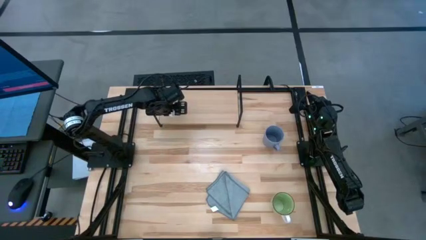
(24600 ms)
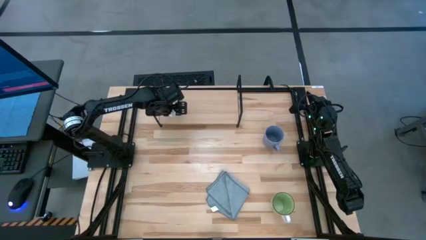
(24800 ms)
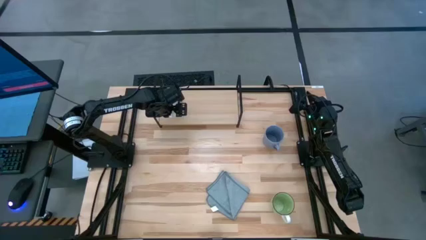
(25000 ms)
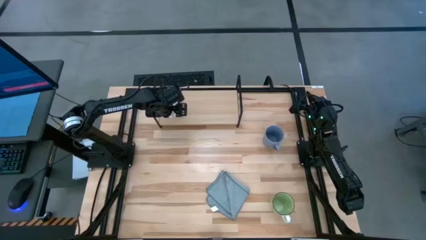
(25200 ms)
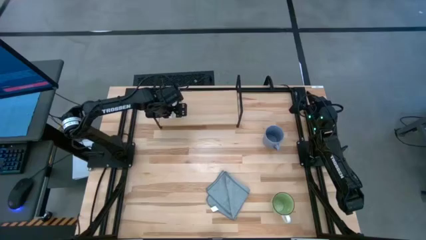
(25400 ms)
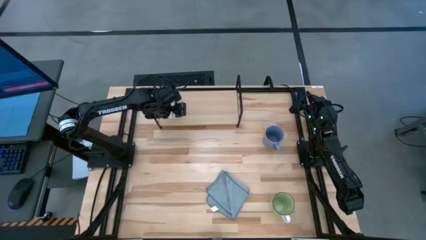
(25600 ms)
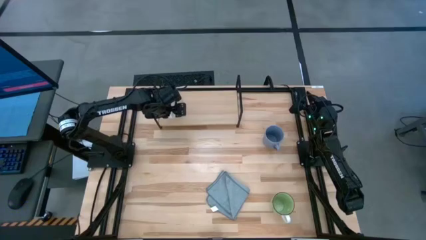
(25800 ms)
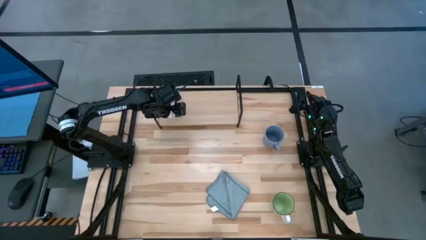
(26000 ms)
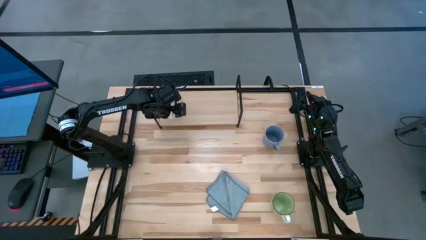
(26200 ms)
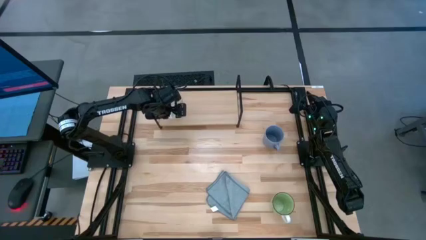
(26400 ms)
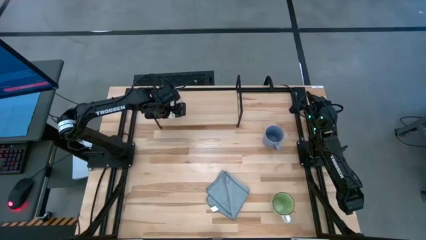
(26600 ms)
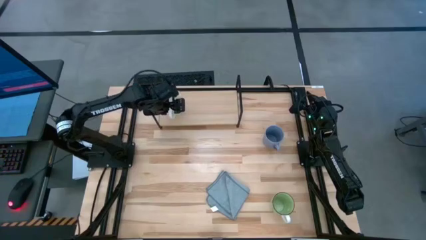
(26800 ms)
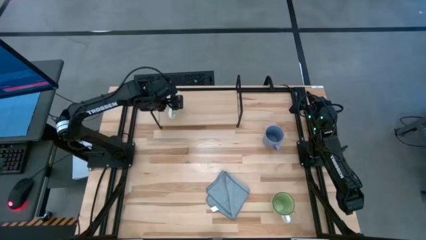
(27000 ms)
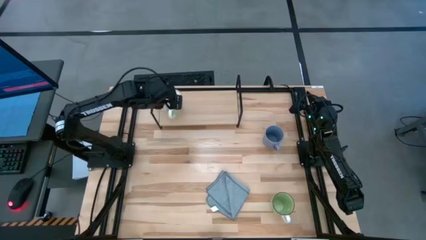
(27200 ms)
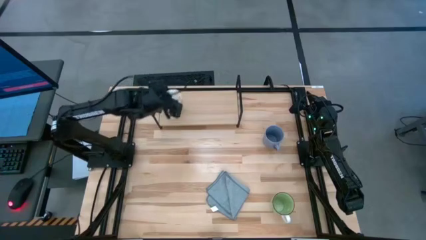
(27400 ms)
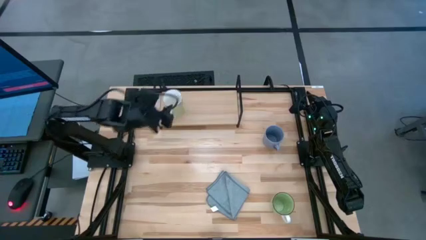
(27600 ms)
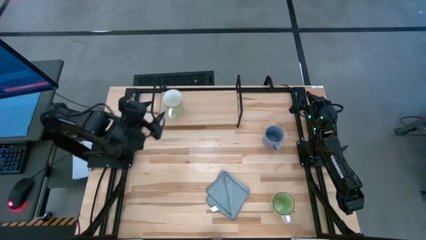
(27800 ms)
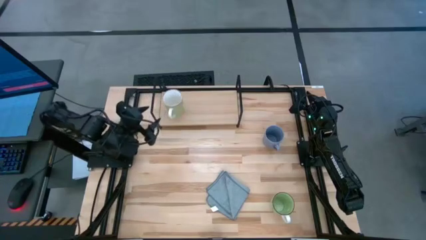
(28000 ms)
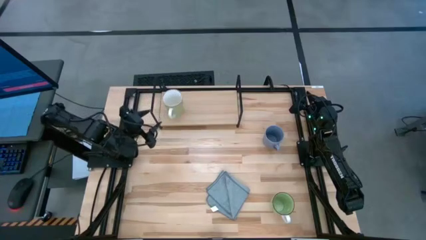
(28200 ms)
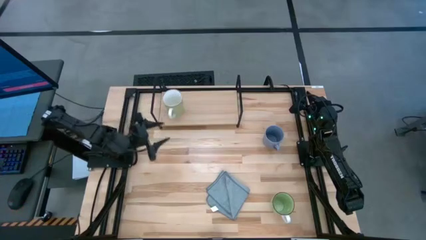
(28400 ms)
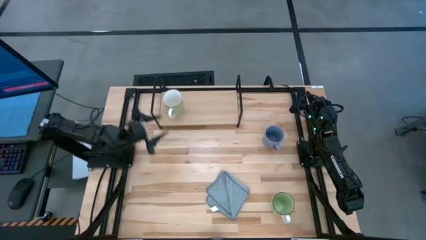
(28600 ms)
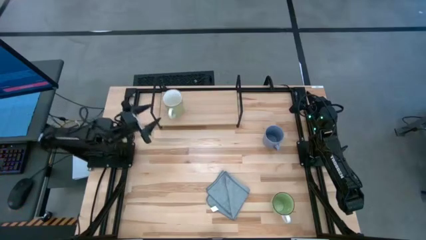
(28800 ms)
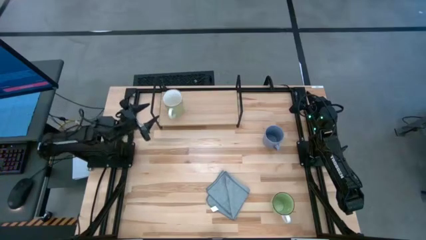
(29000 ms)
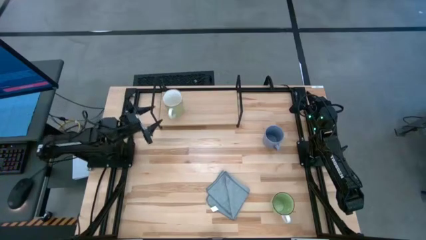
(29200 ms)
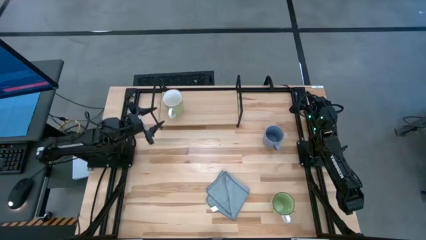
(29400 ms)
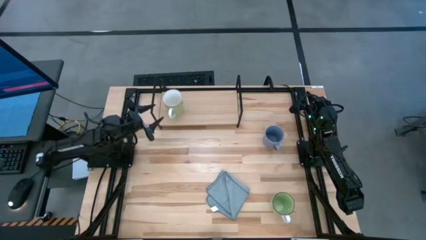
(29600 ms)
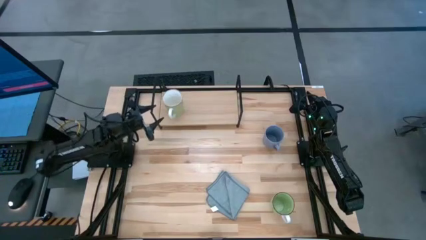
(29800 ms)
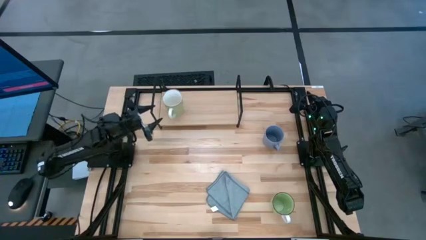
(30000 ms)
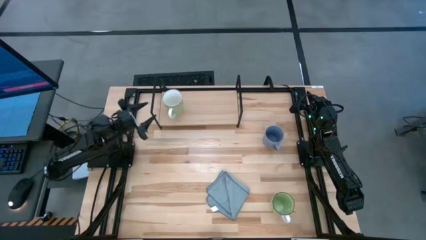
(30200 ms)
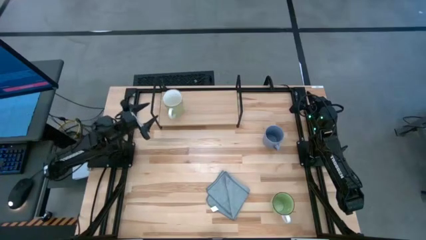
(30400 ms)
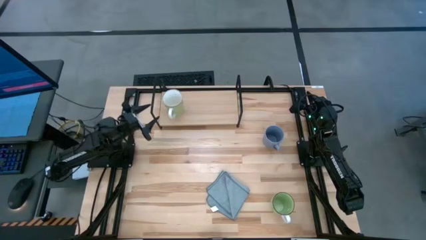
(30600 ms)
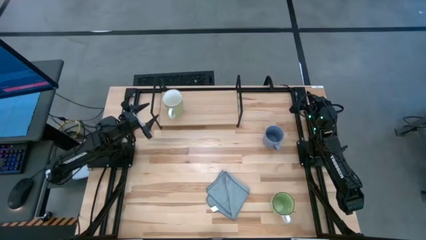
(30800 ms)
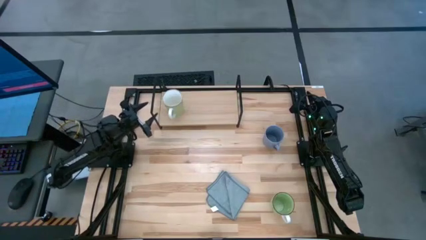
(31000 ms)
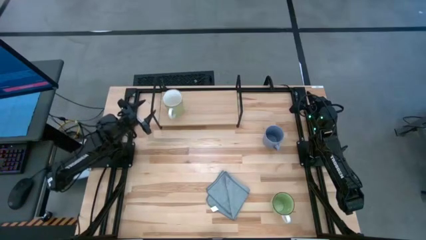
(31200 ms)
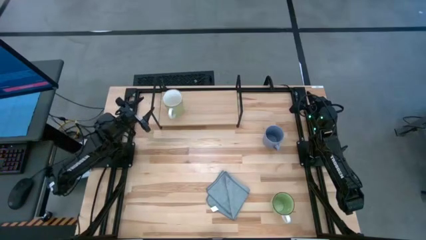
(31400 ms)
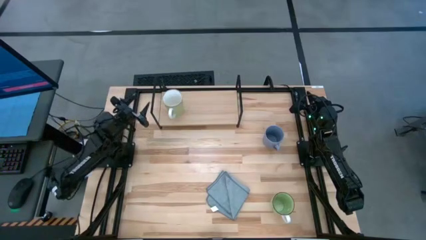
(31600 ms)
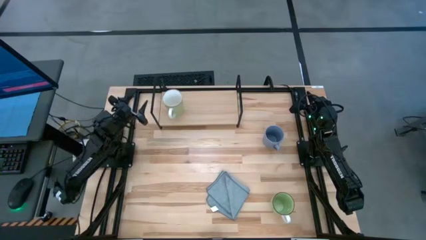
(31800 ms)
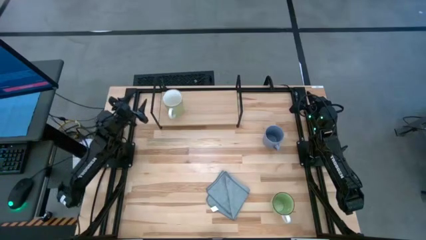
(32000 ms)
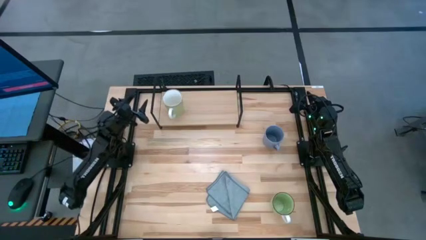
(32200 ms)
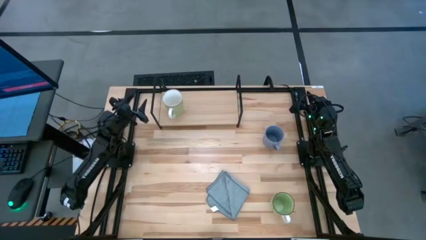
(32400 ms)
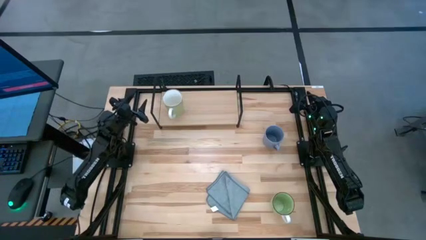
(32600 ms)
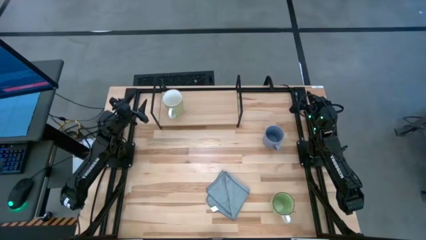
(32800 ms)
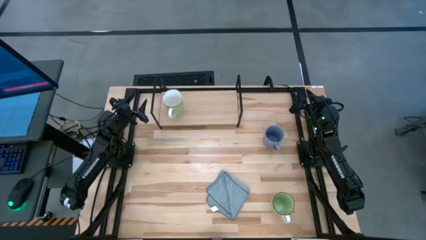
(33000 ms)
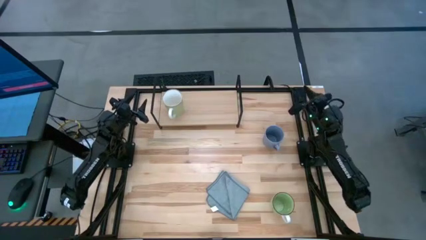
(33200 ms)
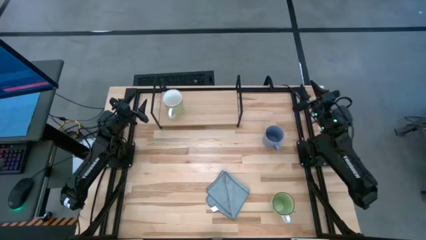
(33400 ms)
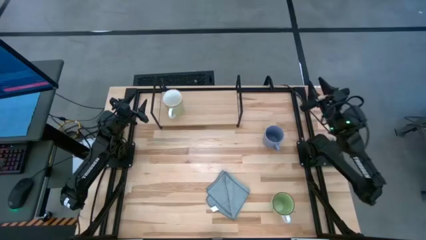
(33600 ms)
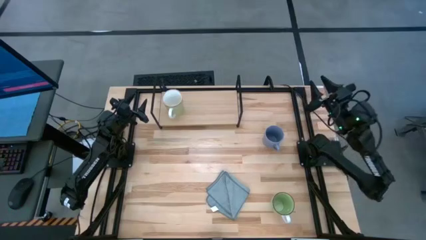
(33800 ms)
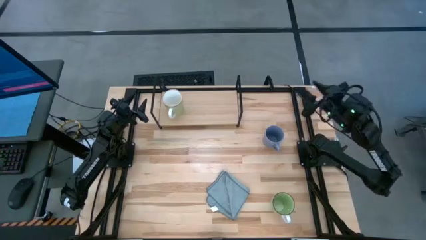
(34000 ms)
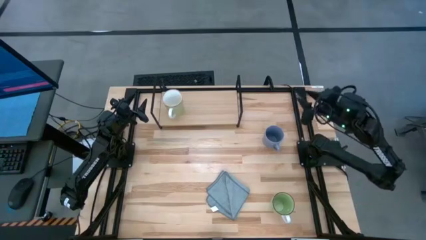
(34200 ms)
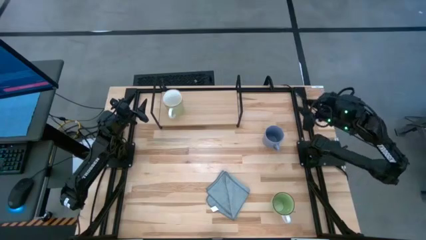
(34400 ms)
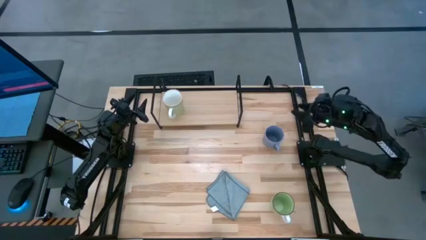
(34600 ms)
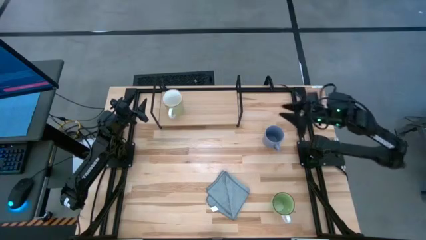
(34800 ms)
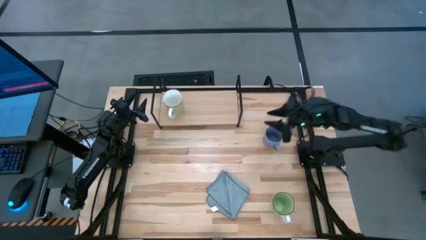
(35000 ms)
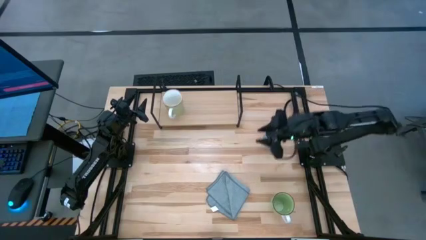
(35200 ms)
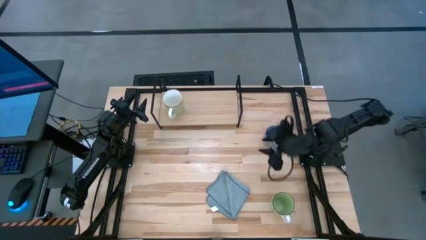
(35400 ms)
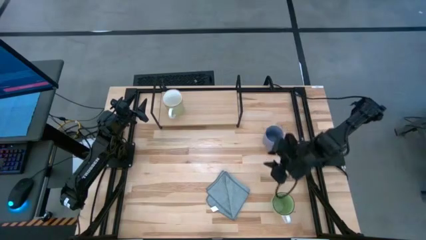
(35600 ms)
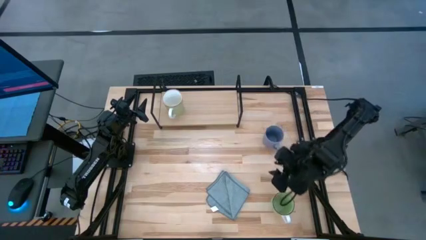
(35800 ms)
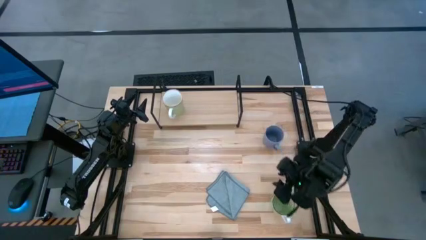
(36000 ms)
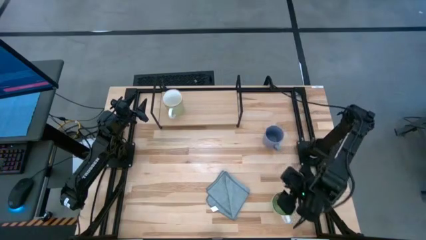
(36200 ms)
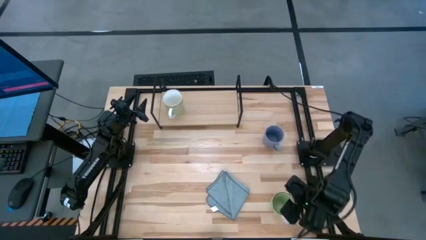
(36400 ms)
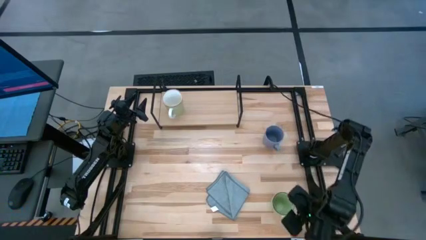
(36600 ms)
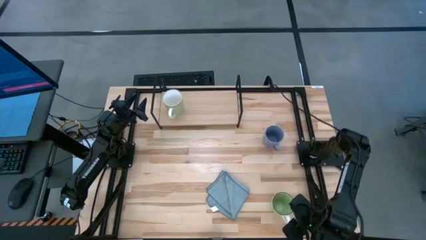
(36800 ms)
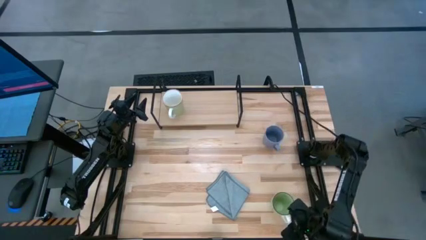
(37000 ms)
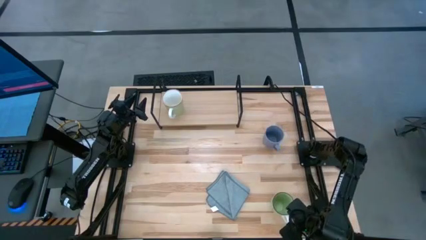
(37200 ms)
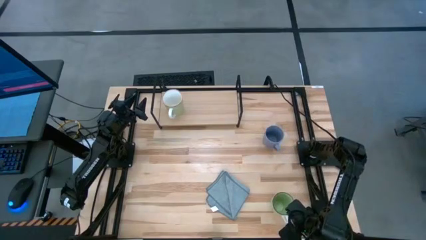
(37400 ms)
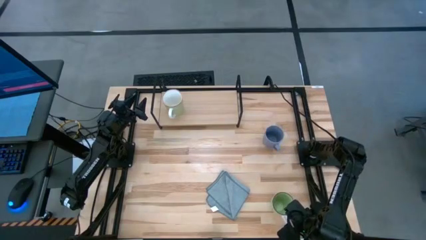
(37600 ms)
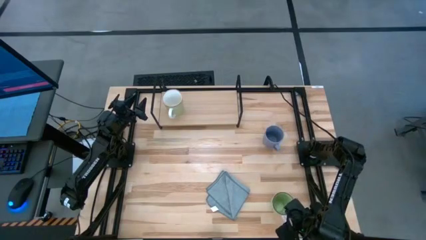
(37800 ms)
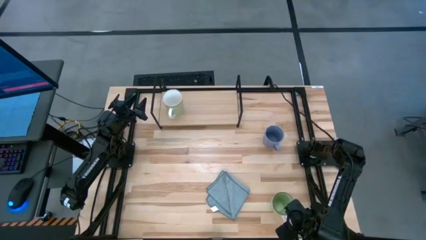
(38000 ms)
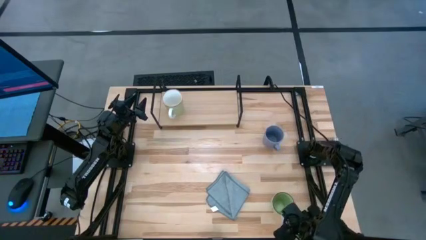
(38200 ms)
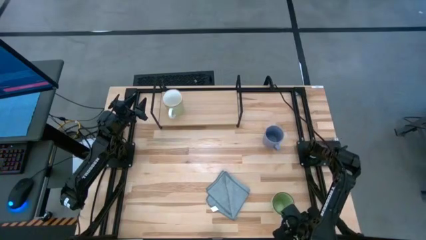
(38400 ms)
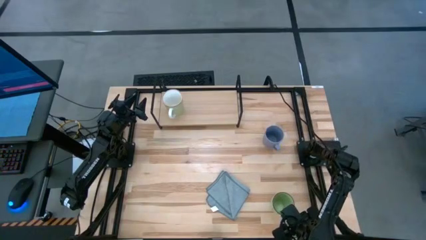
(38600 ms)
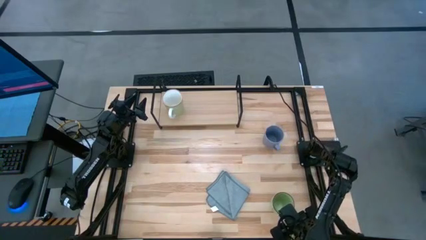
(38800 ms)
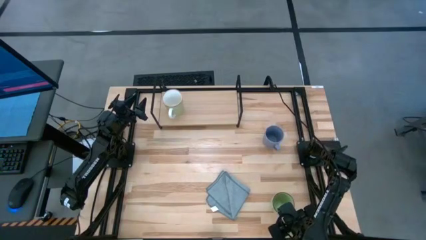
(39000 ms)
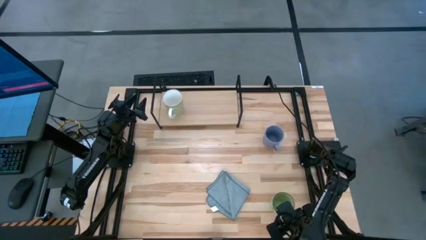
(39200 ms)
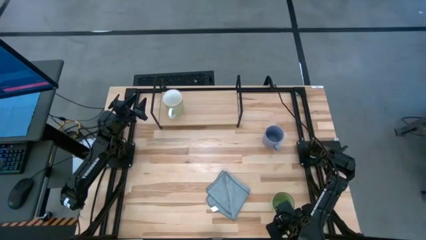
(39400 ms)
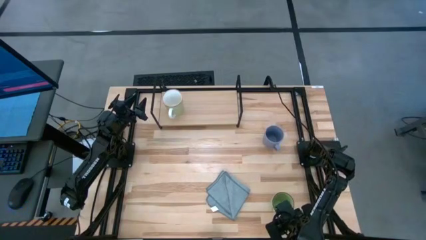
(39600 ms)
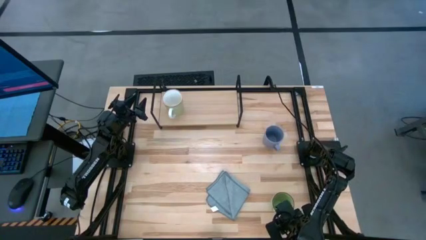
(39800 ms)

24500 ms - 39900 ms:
Task: Stack small to large cups/mugs on shelf
Put the green mug with white handle on the shelf

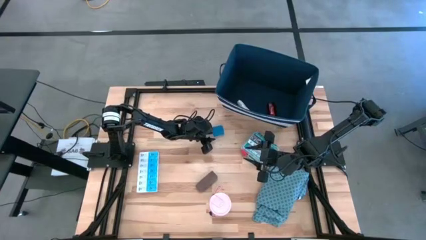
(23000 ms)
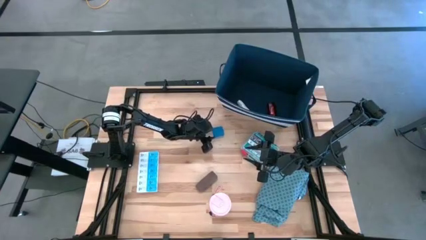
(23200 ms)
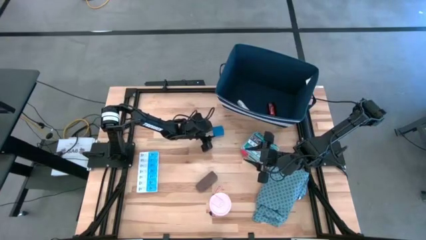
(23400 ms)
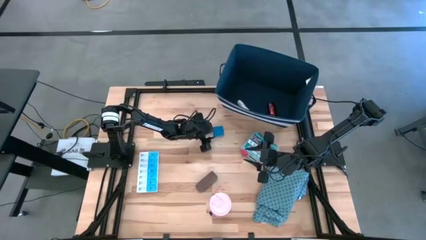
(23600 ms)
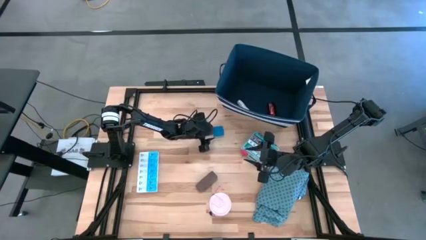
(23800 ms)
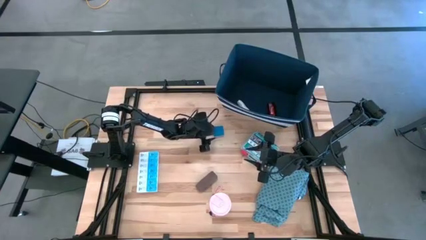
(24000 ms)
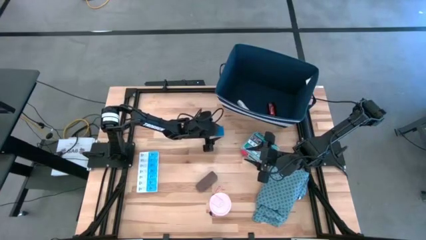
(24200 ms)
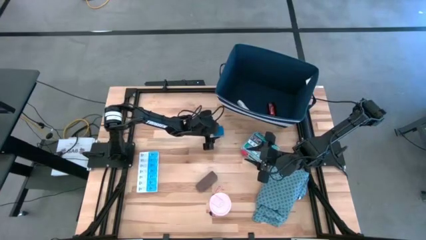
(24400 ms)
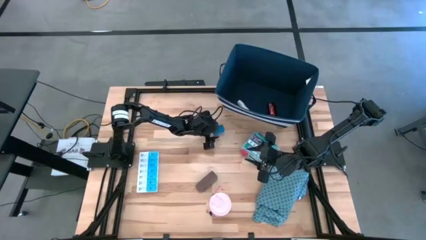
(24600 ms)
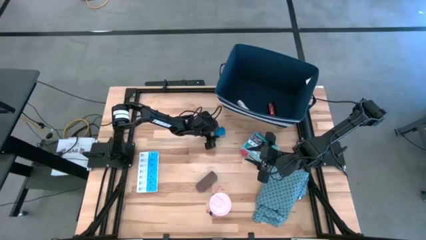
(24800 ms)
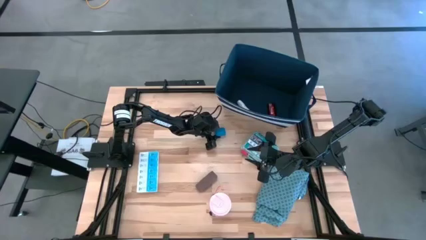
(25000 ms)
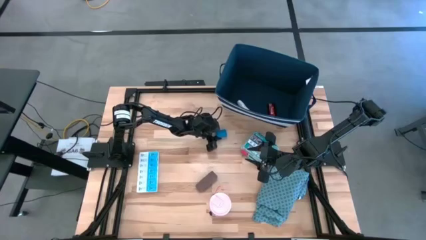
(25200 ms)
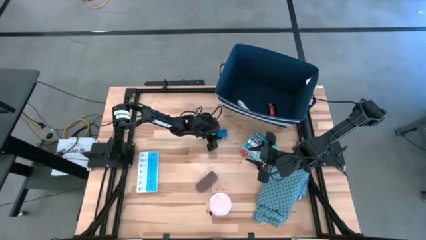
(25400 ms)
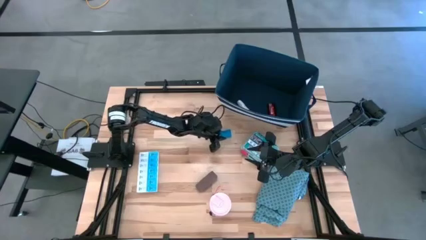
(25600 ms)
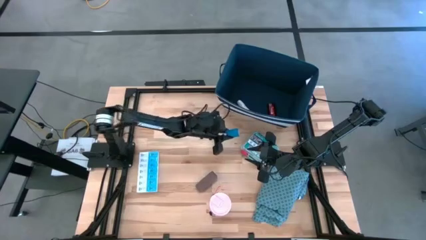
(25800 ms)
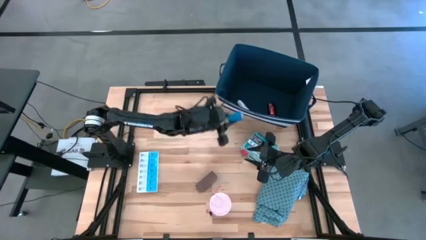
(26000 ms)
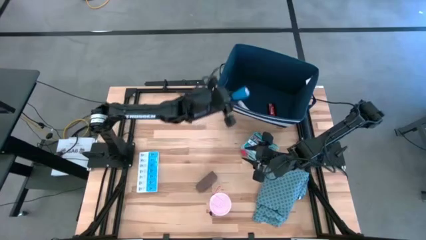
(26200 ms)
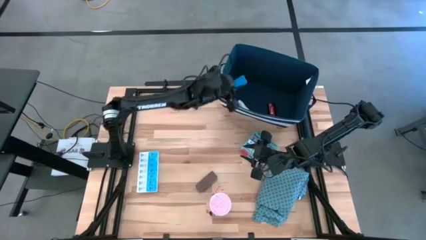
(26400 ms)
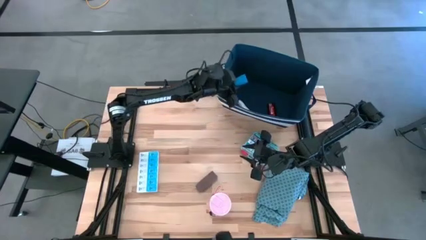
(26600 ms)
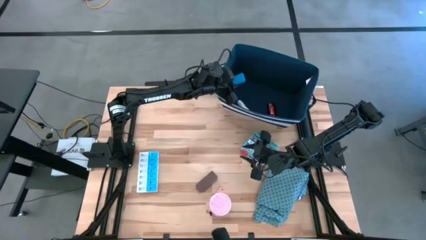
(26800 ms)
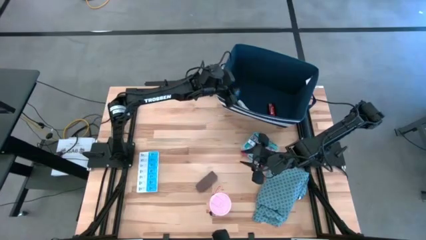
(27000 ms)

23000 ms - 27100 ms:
Task: Pick & place medical supplies in basket/bin
Put the blue bandage into the white bin
